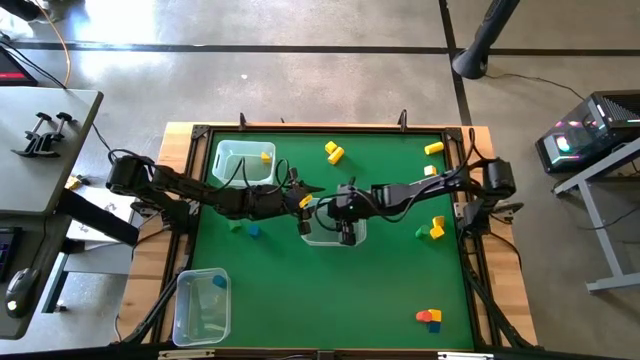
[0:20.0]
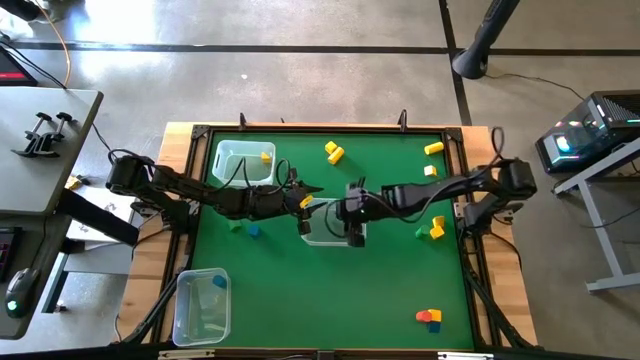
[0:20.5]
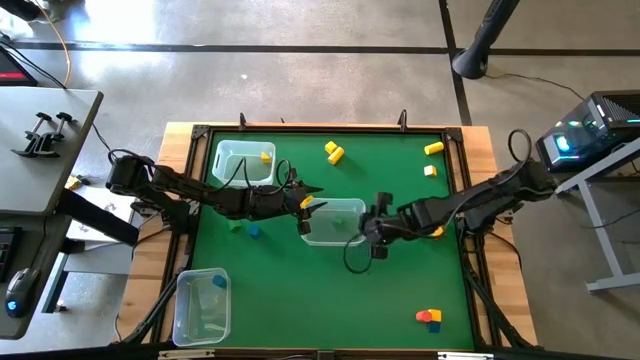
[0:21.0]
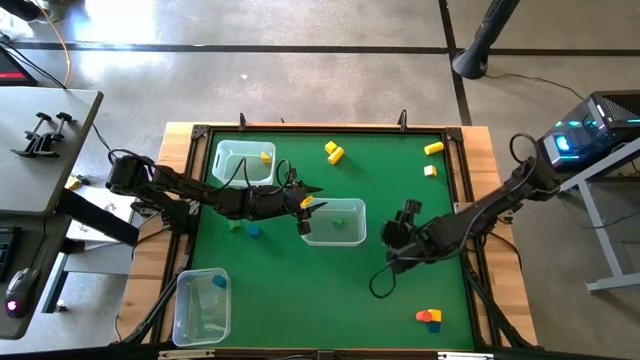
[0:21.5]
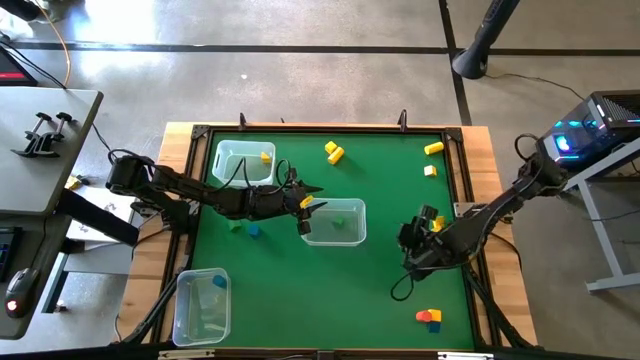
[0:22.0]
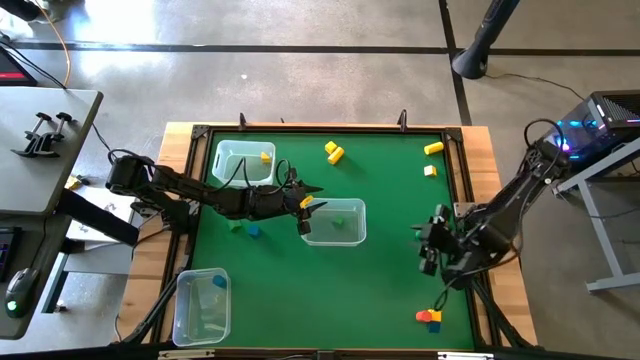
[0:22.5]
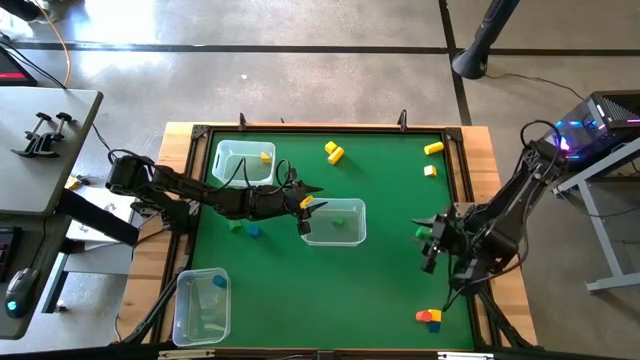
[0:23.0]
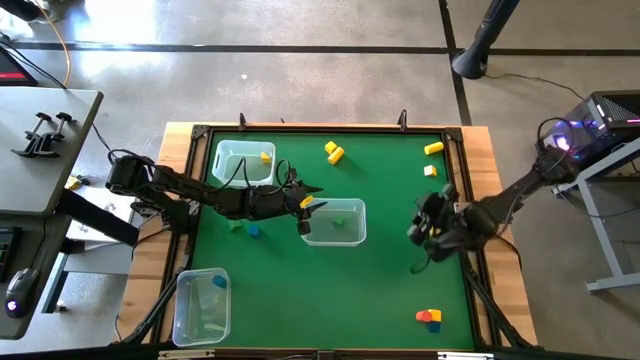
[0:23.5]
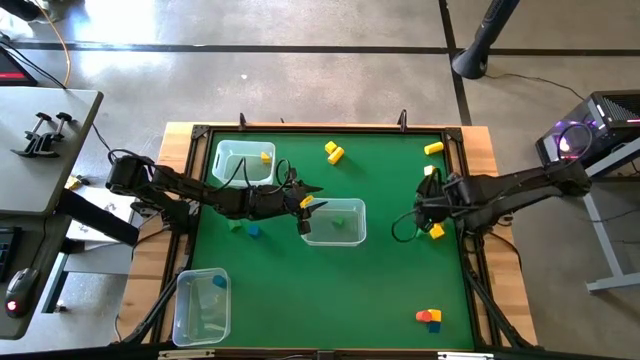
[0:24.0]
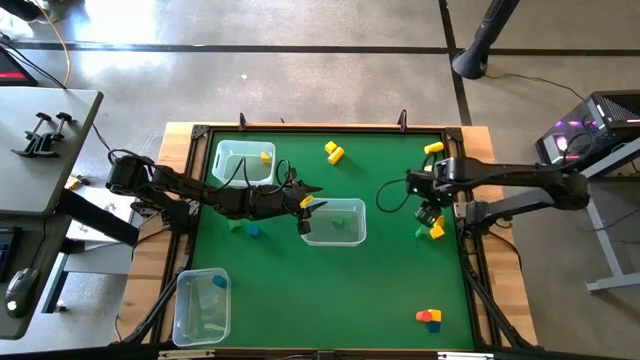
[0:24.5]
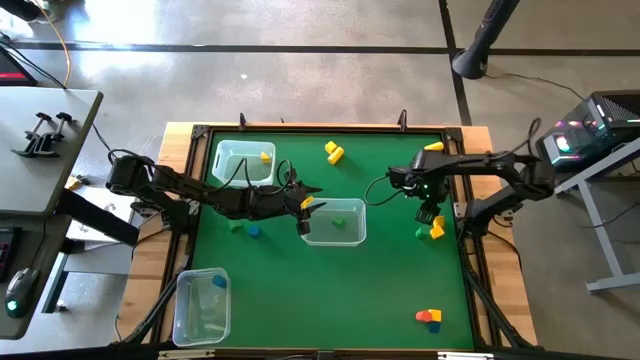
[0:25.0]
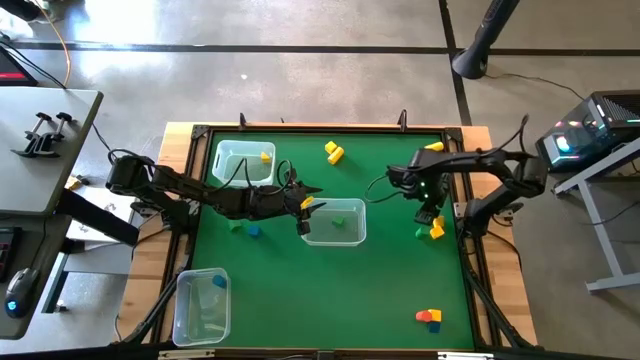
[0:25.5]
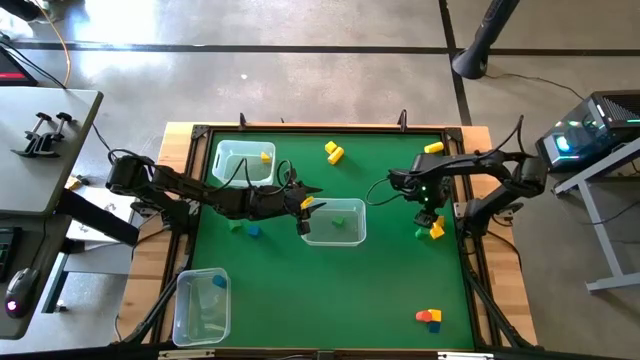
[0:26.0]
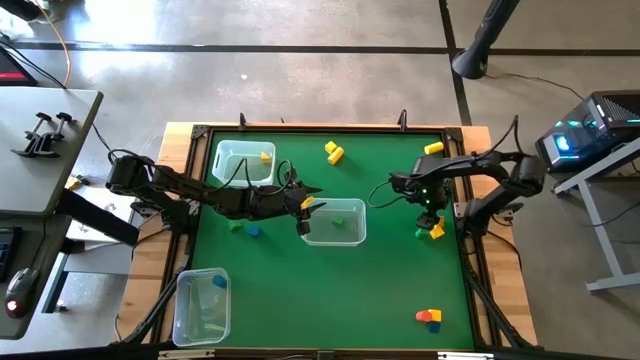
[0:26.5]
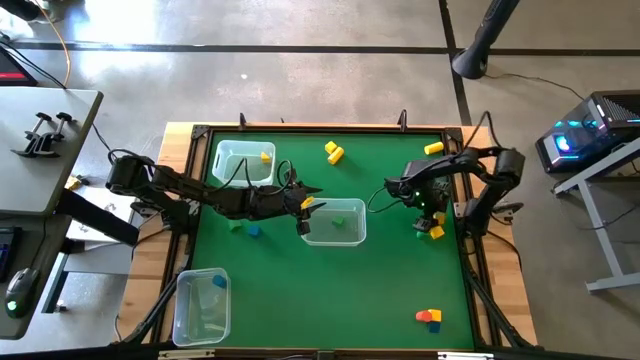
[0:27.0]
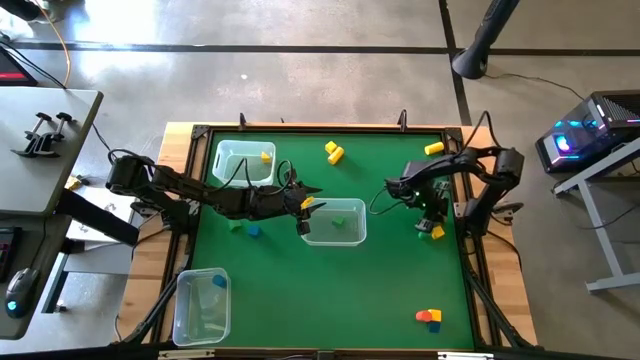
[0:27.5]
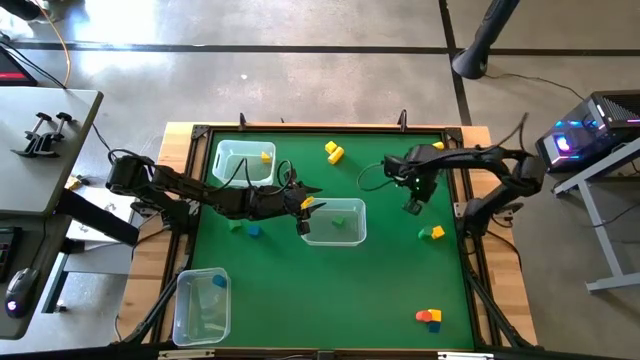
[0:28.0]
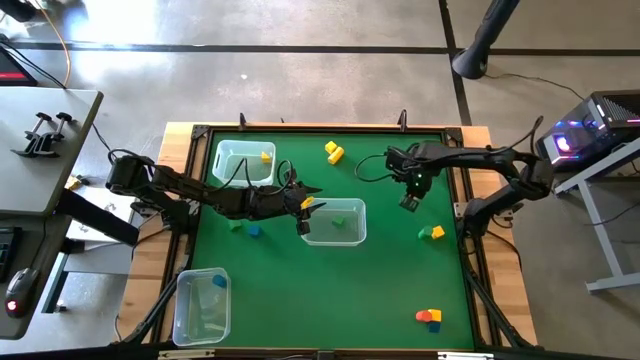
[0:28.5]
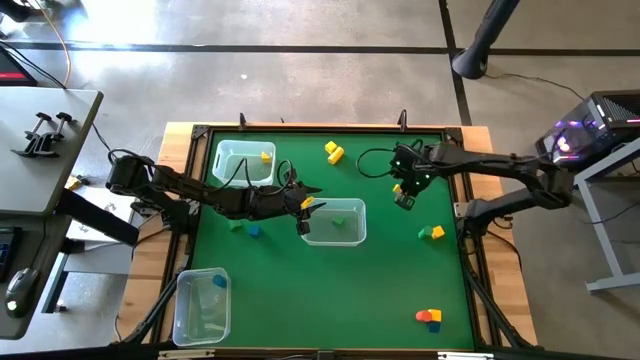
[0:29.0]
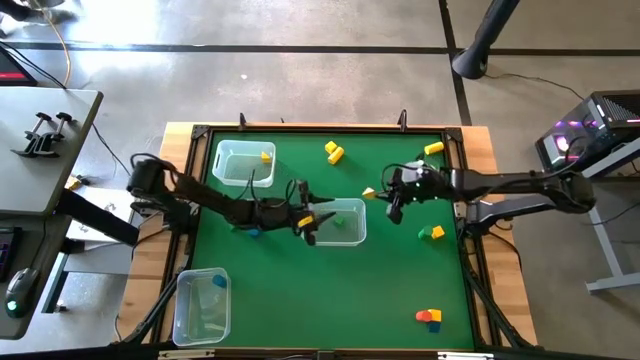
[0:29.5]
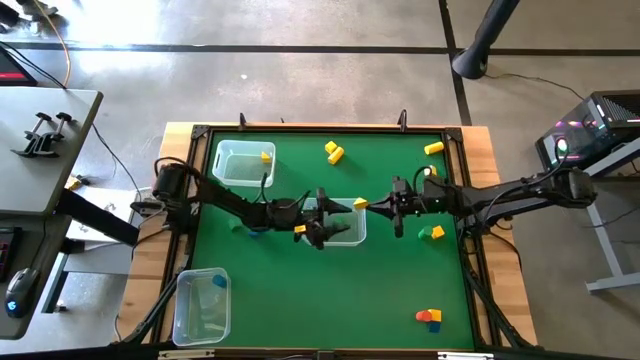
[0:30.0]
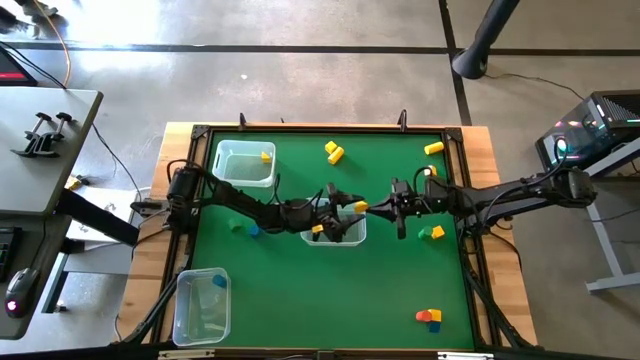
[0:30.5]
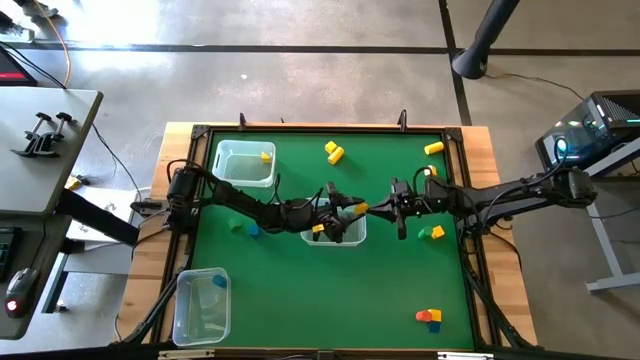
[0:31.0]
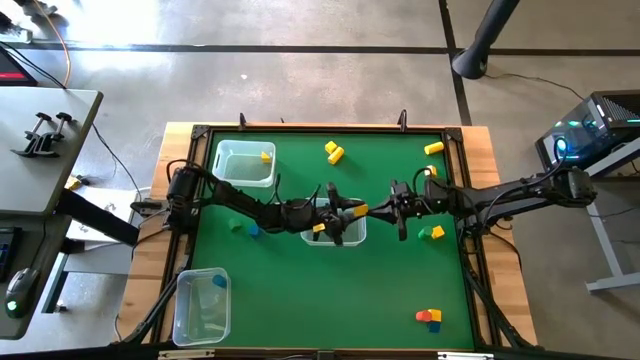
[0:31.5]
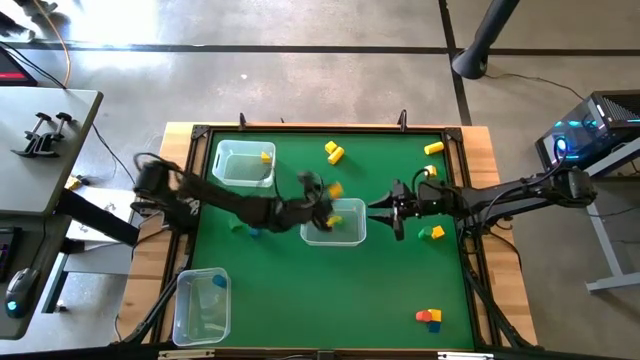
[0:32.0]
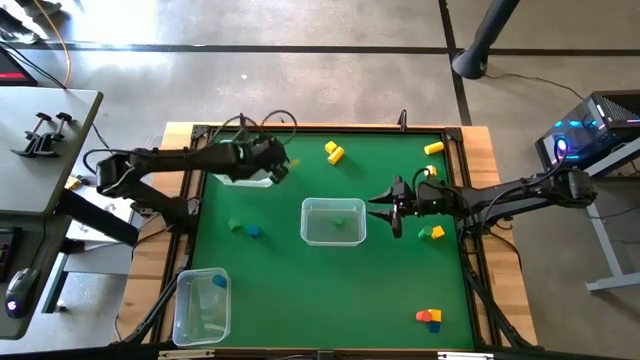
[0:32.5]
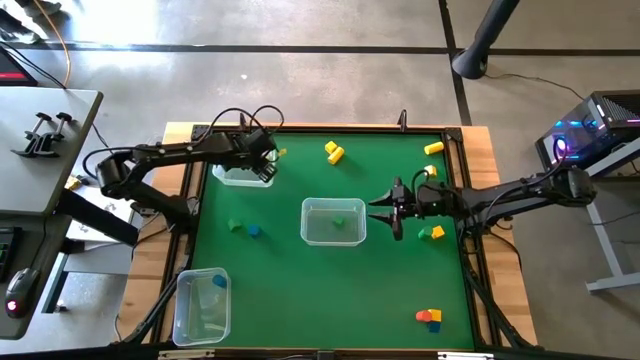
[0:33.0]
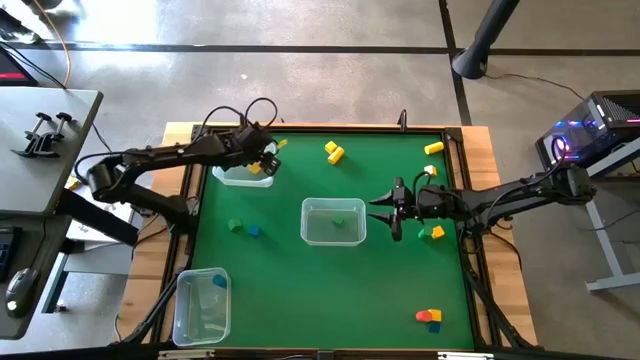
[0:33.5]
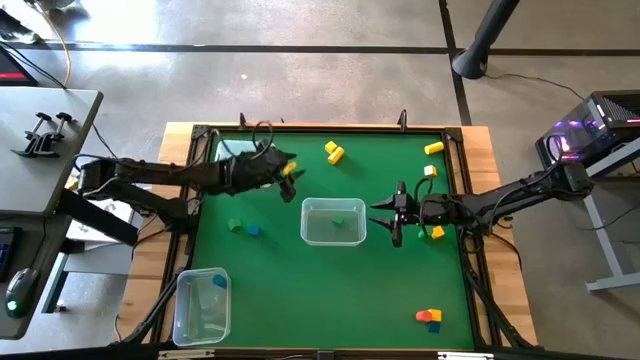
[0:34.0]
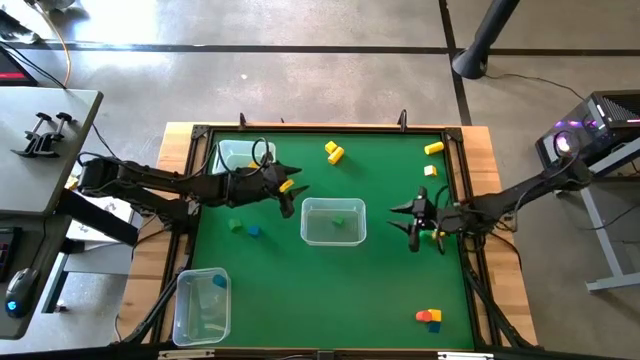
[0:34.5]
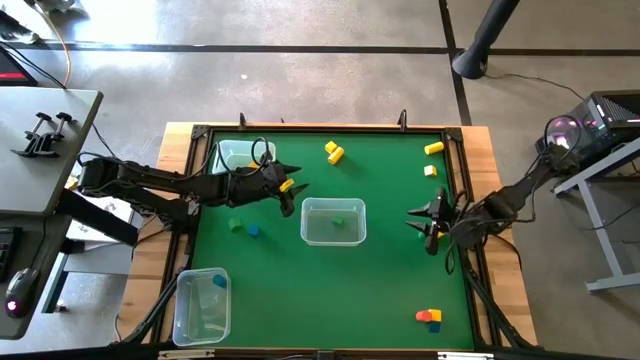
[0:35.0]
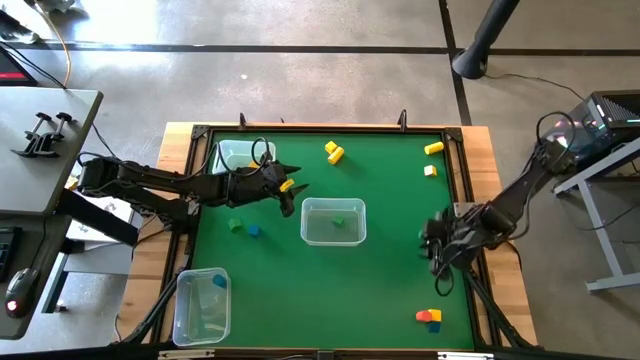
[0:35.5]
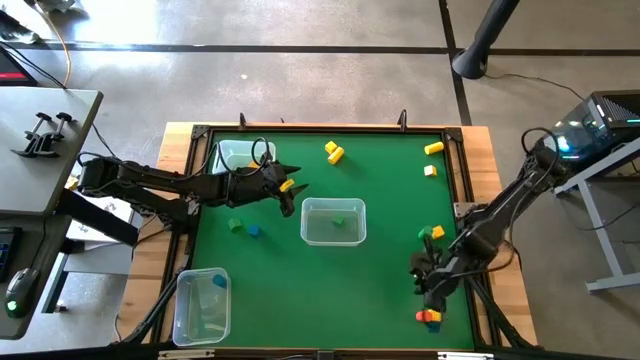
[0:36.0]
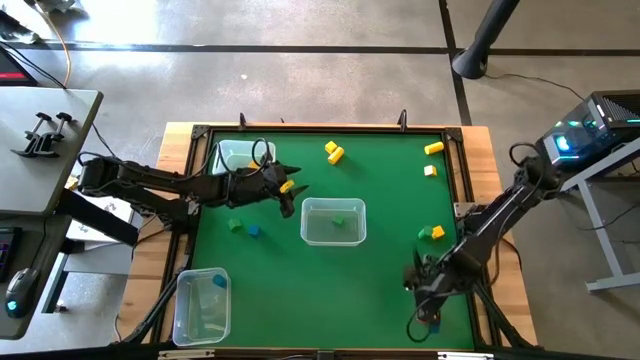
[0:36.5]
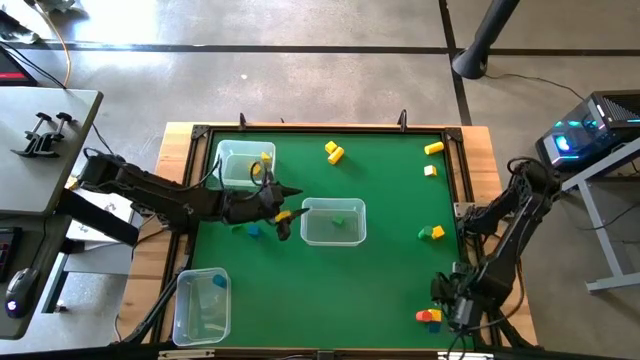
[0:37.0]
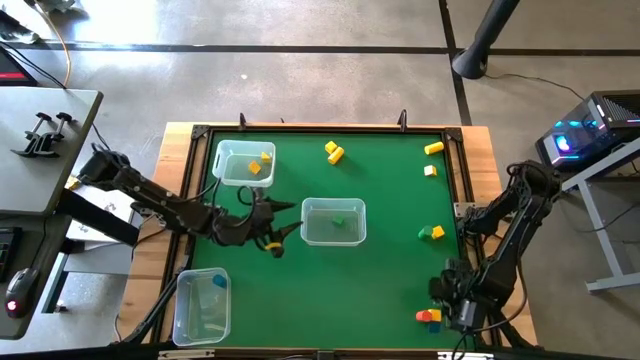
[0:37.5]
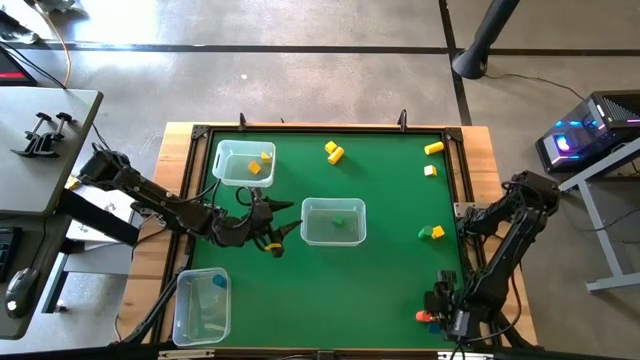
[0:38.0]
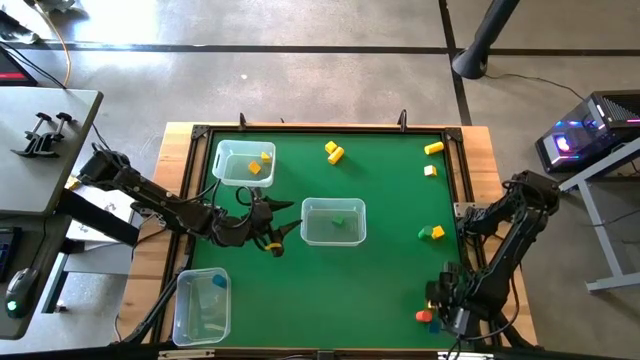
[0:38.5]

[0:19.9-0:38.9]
Task: Sort blocks by size
Put the yellow triangular block into the top left transparent bin

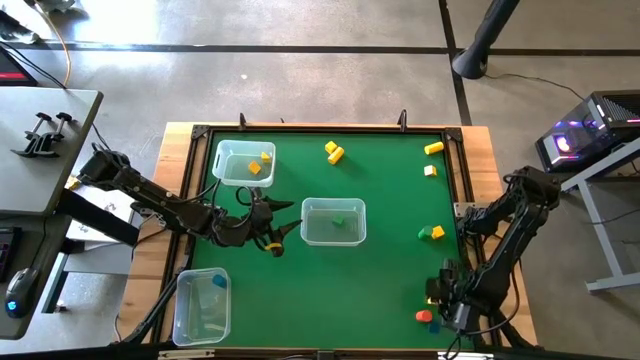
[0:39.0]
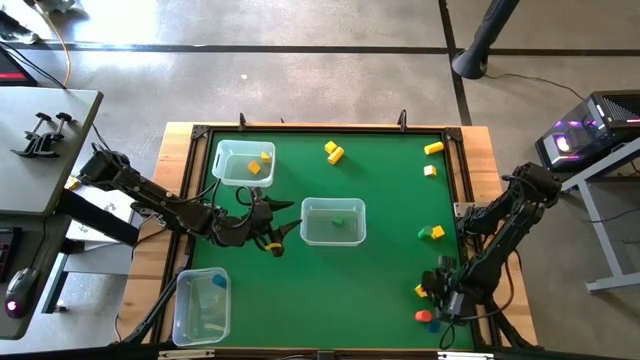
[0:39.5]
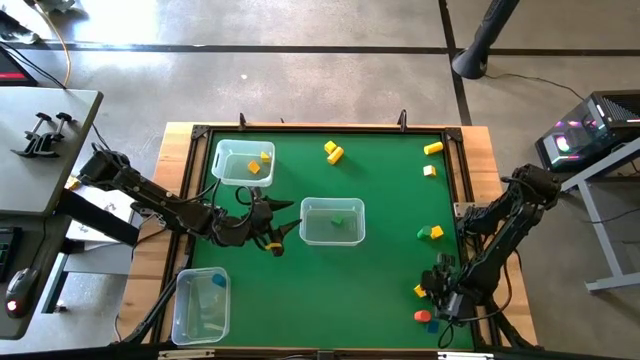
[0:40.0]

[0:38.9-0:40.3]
Put the yellow cube block into the middle right transparent bin

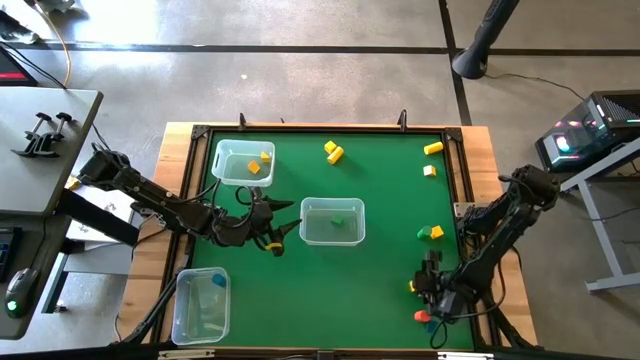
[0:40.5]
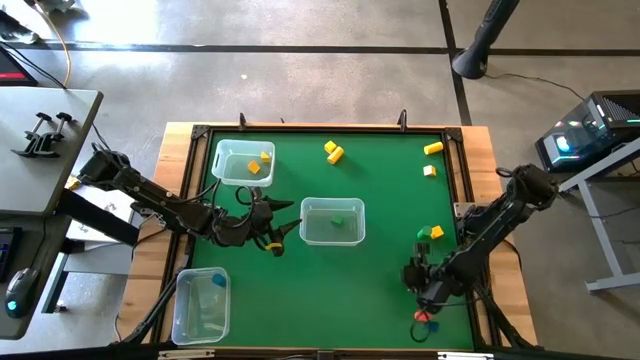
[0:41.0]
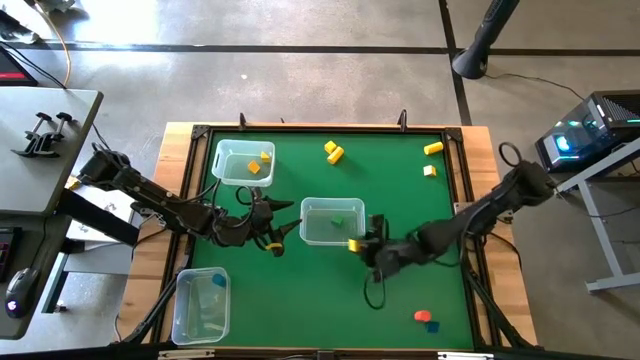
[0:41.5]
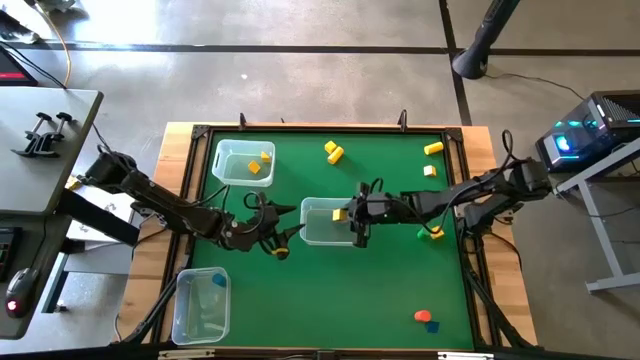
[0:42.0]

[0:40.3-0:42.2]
Put the yellow cube block into the middle right transparent bin
